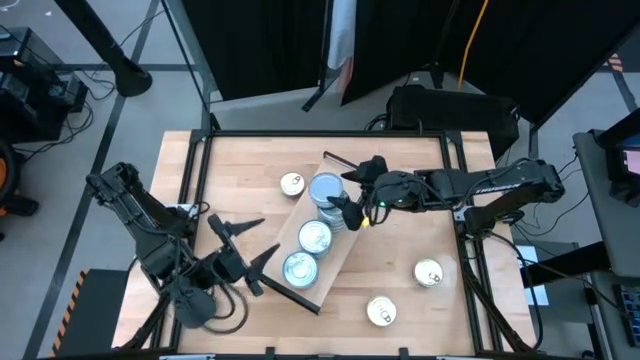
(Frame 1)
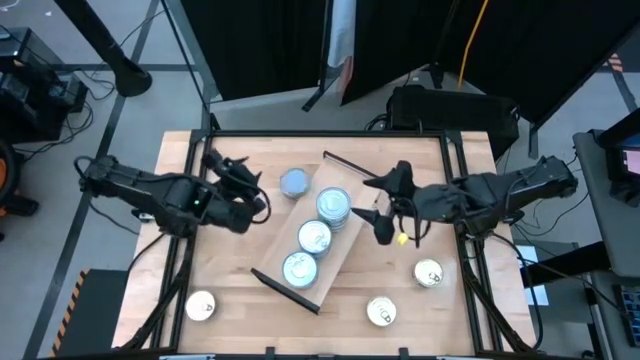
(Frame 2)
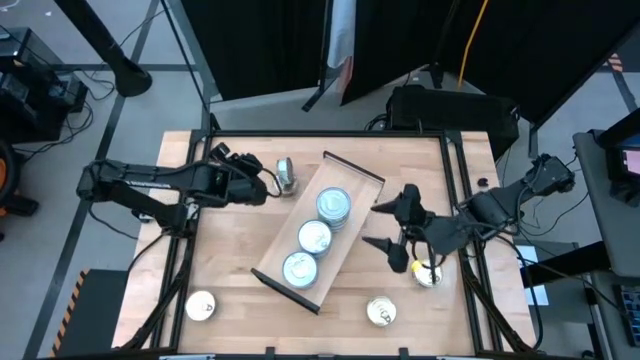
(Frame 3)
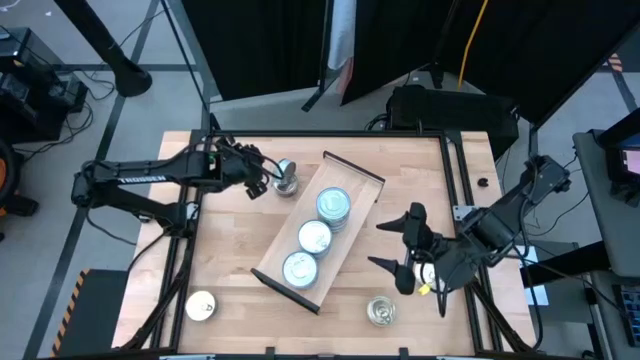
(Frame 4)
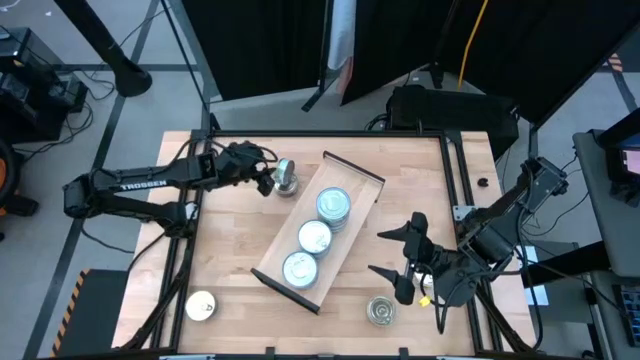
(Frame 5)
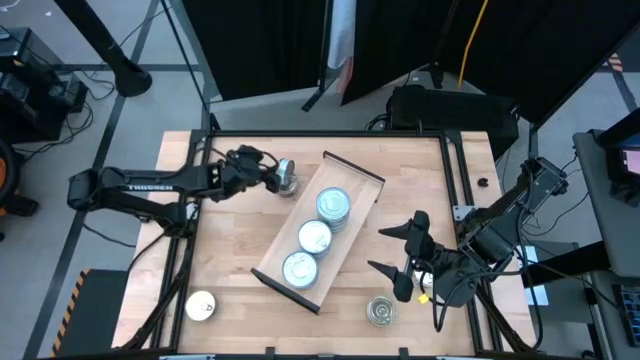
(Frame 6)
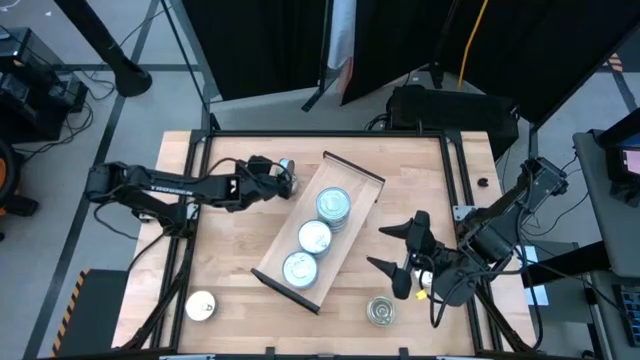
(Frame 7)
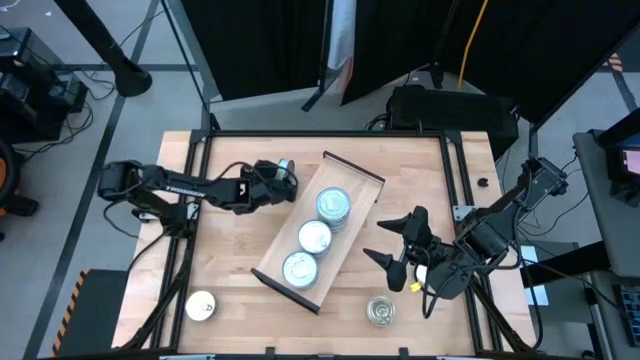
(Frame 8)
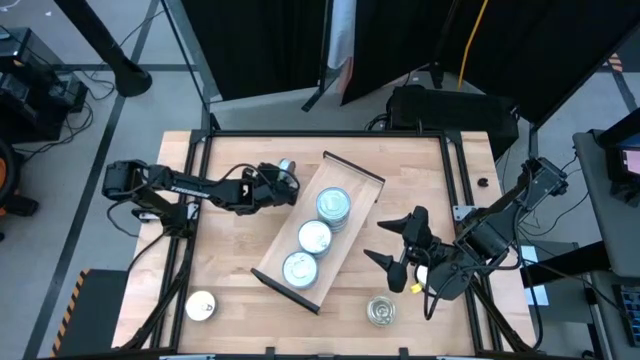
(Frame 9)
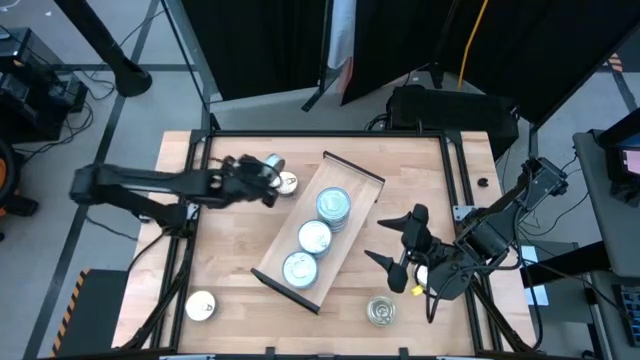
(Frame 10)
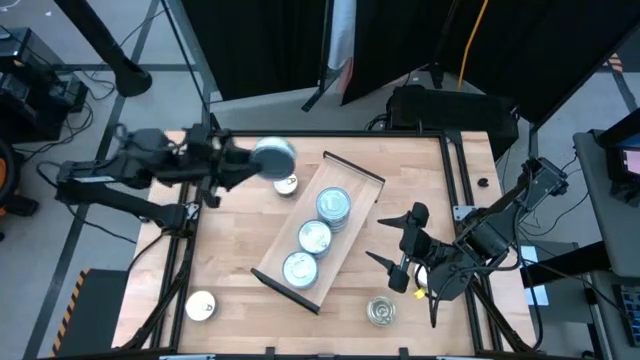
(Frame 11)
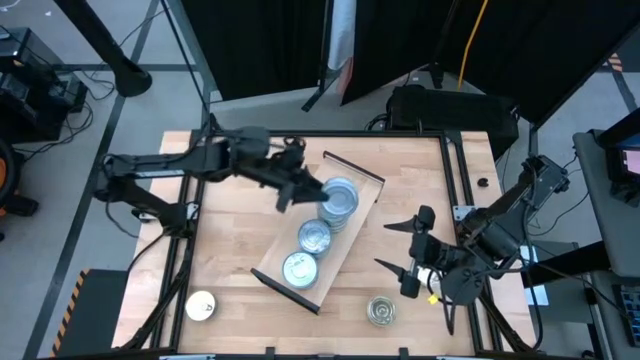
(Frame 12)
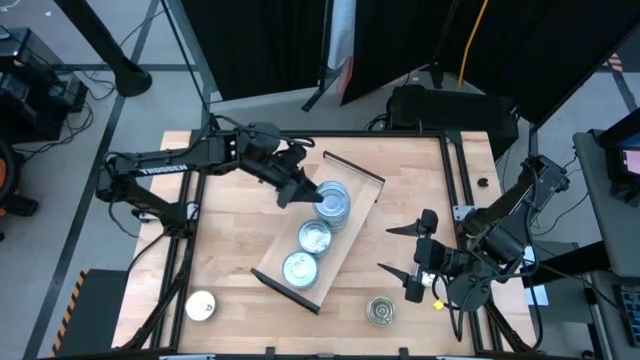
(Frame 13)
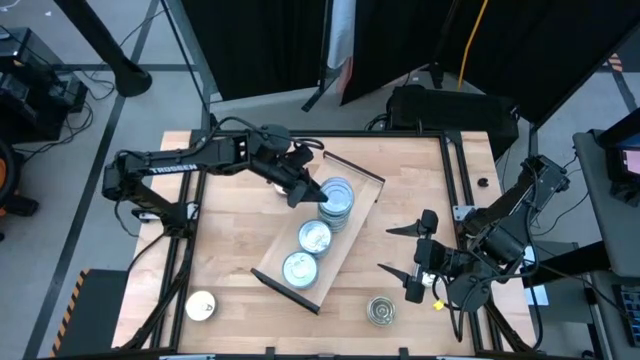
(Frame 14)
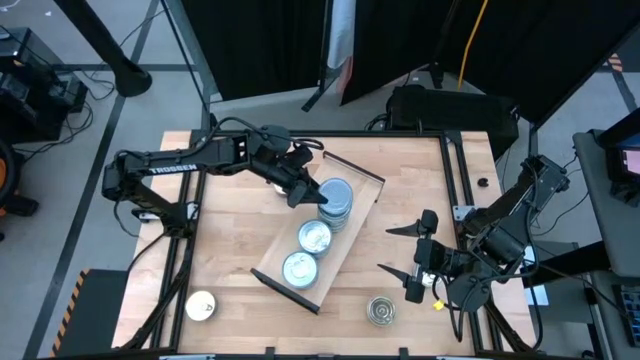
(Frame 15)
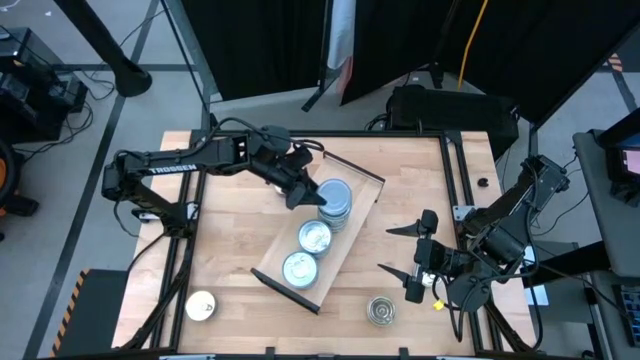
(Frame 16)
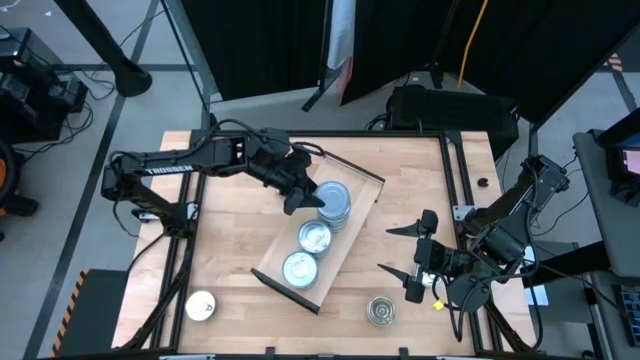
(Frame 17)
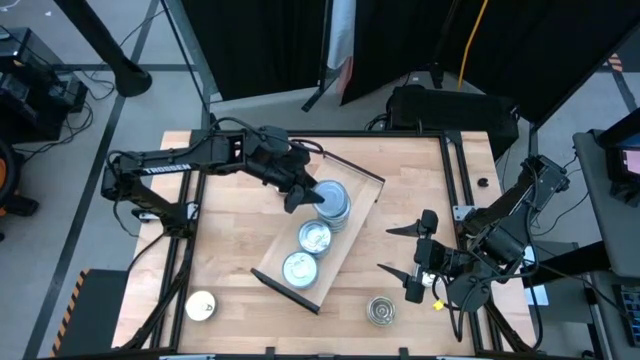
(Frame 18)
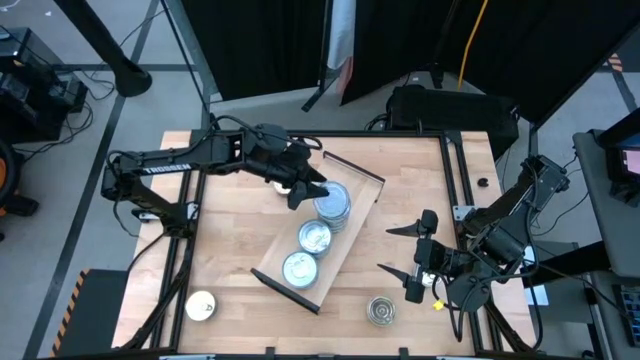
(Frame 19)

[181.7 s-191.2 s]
Task: Stack canned seafood by type on shelf
Stack the green tuna can on top of the other green tuna can

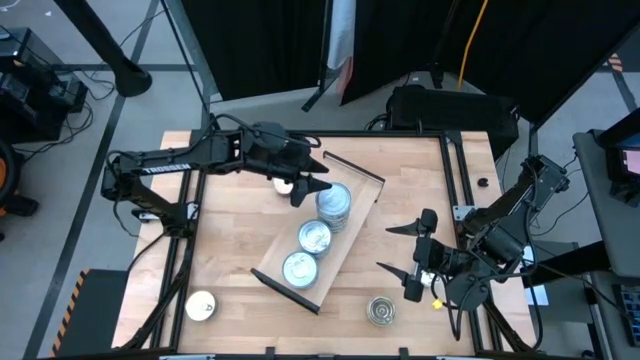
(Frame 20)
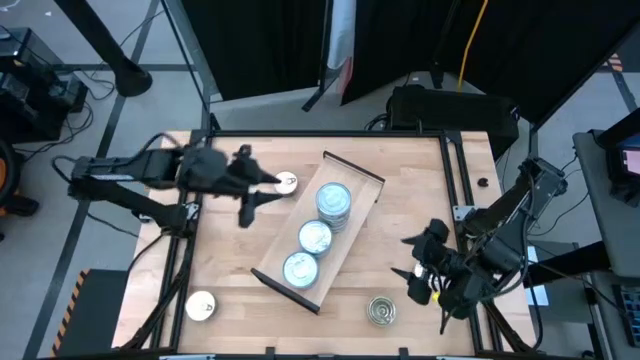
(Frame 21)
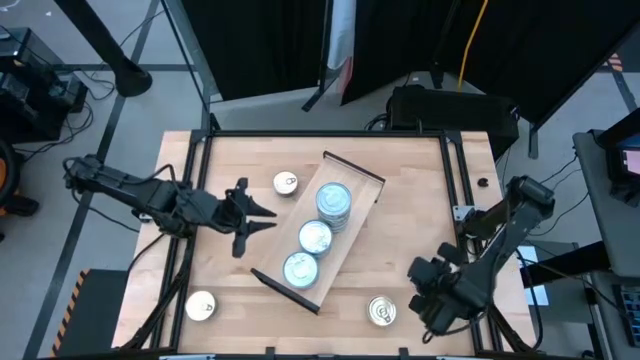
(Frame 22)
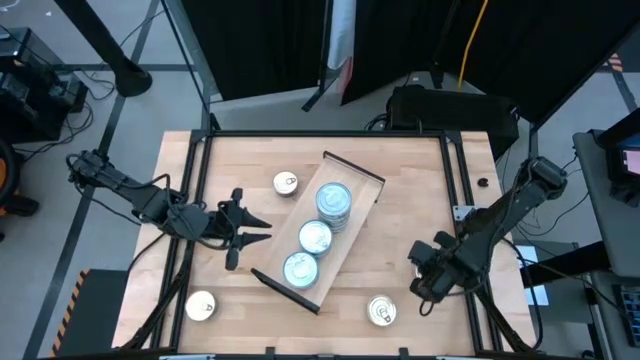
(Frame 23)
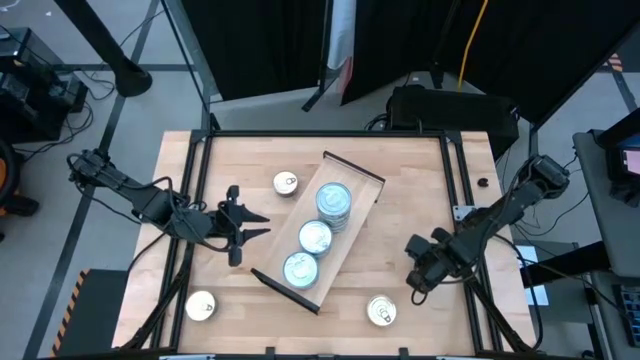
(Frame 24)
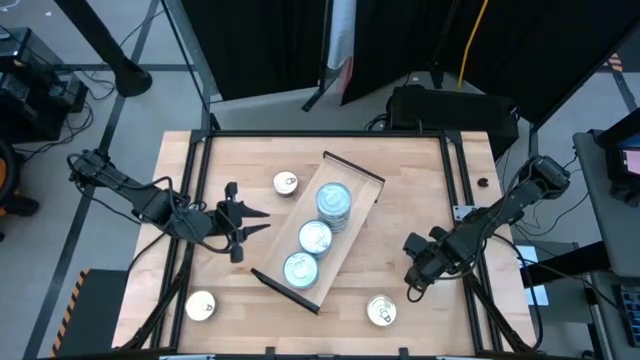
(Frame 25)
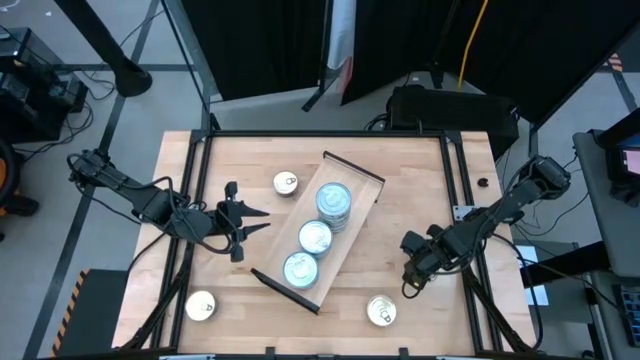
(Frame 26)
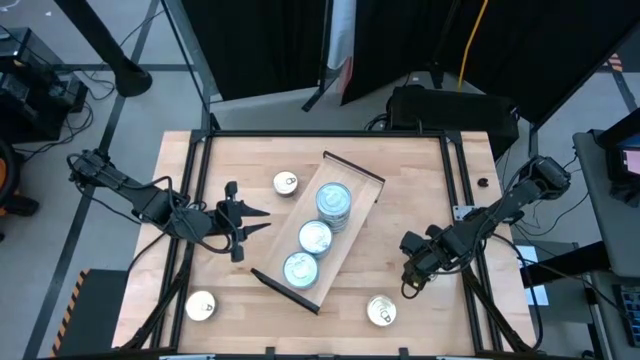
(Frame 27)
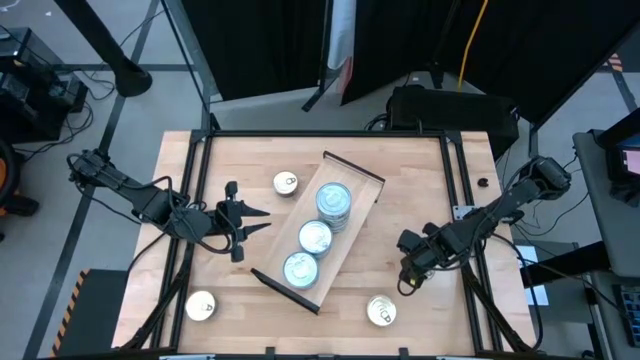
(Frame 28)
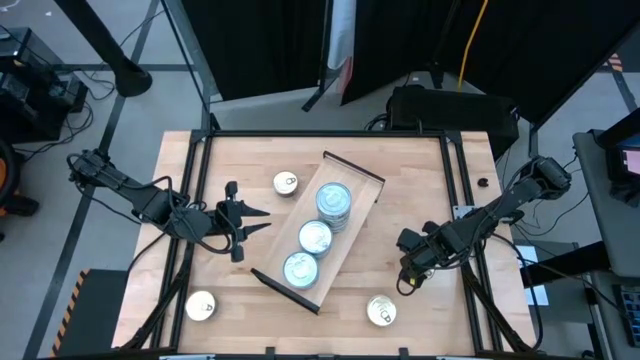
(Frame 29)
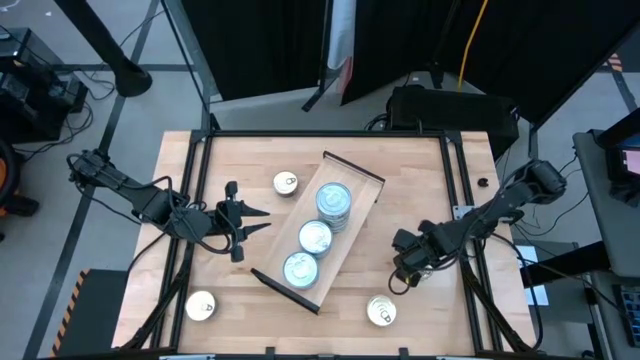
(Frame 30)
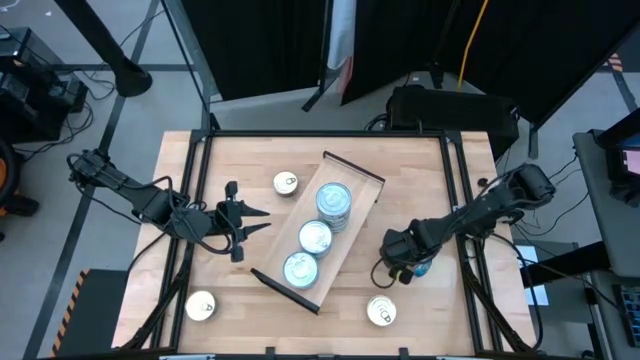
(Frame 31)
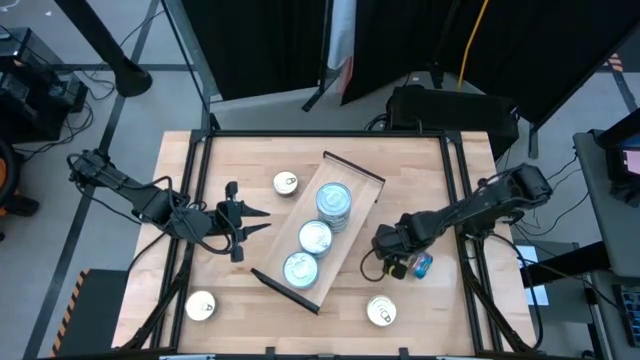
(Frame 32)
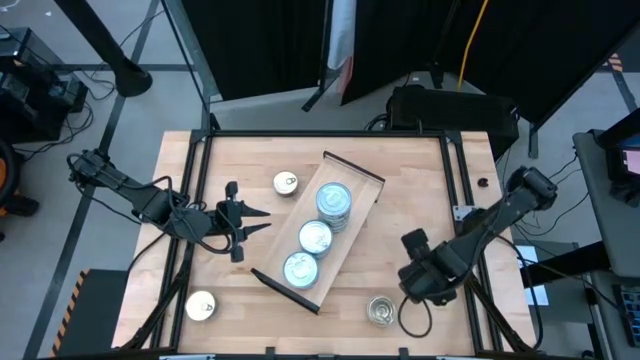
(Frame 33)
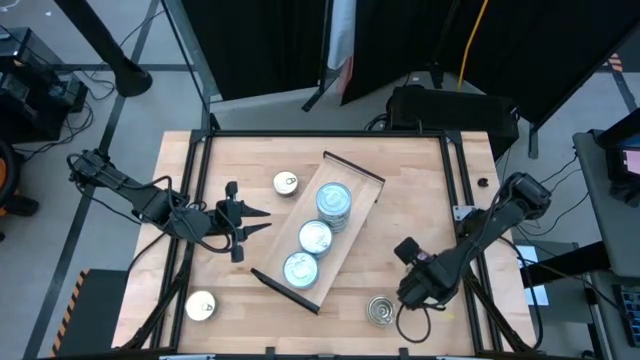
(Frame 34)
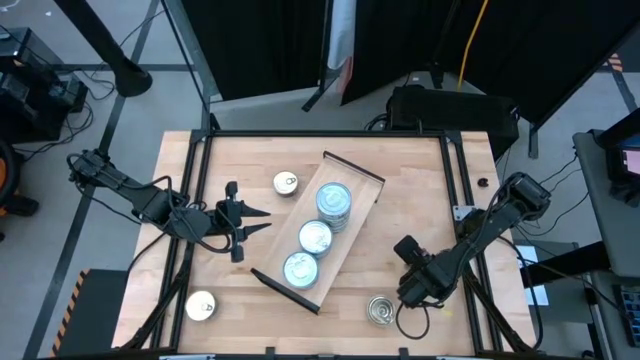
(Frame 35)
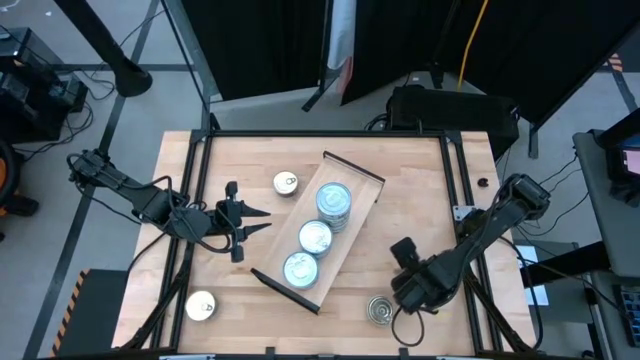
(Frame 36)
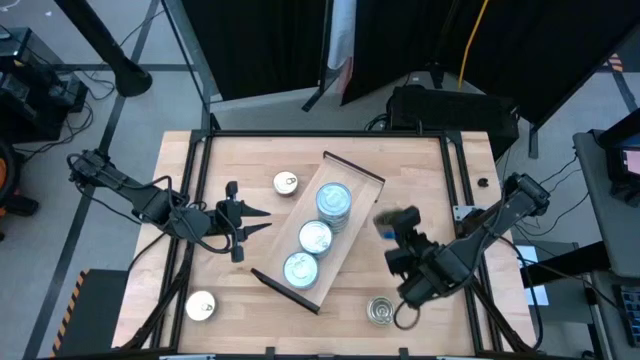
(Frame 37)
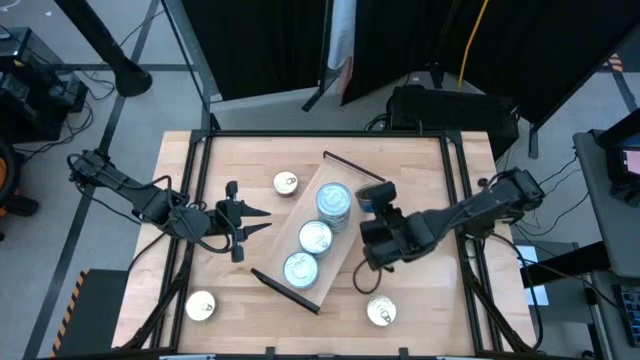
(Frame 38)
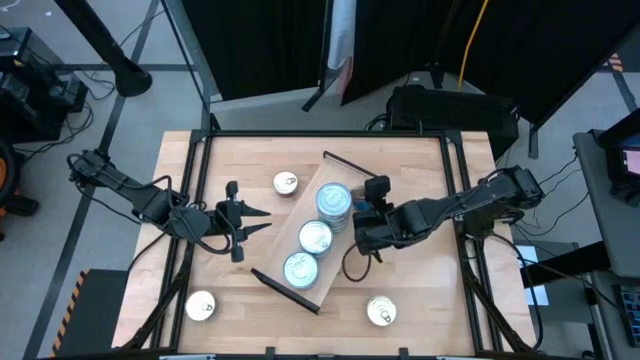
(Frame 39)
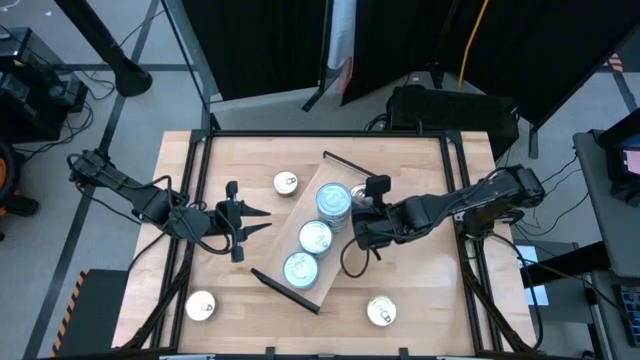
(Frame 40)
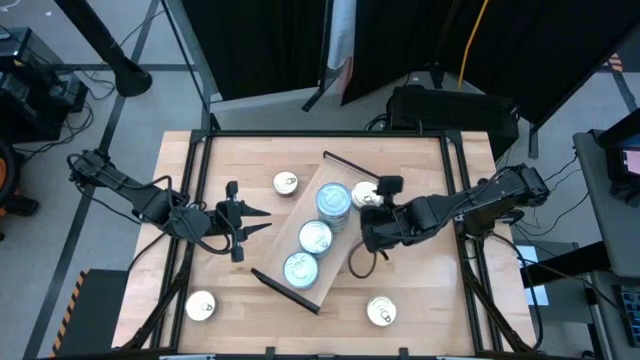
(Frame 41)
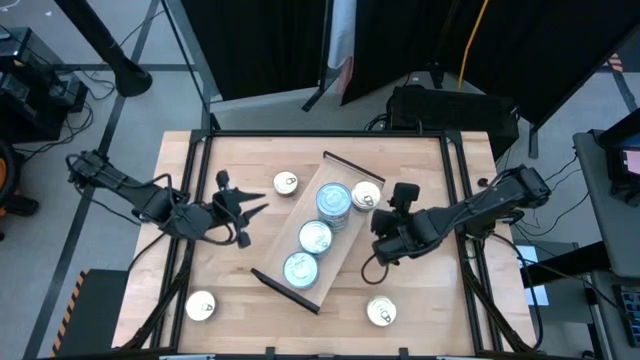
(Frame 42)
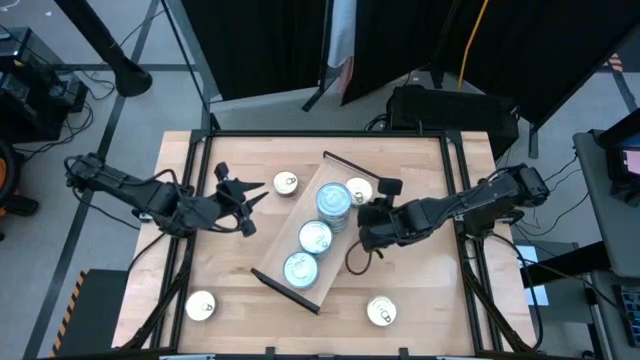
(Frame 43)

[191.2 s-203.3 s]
Put the blue-pink tuna can on the shelf
